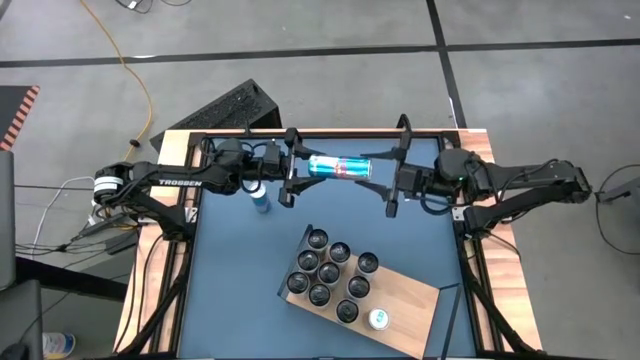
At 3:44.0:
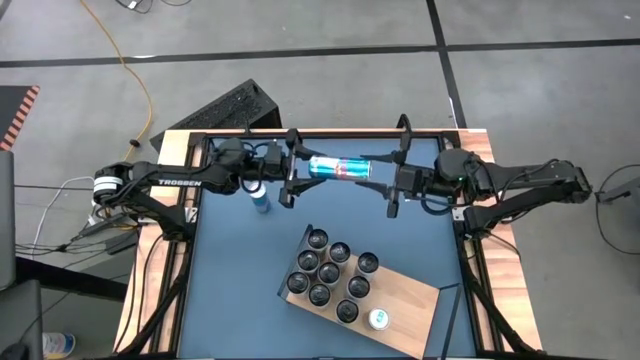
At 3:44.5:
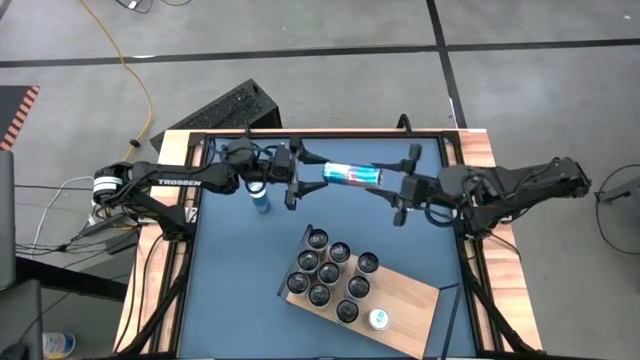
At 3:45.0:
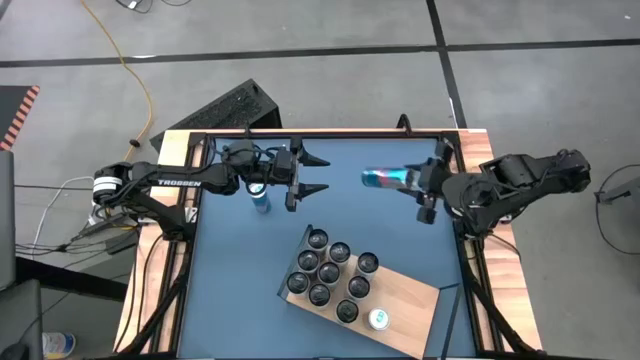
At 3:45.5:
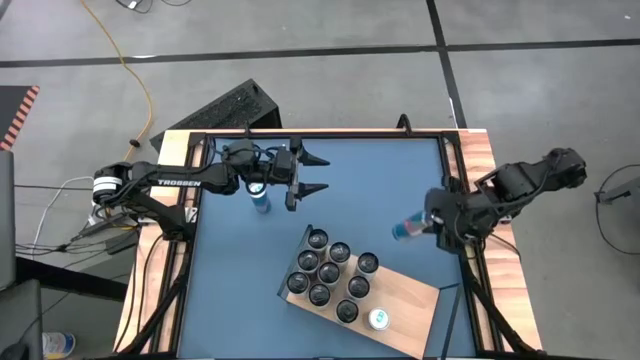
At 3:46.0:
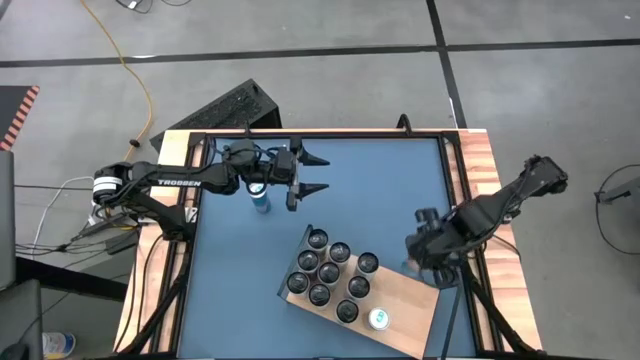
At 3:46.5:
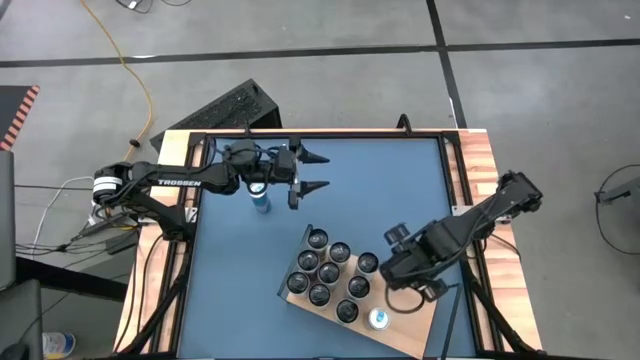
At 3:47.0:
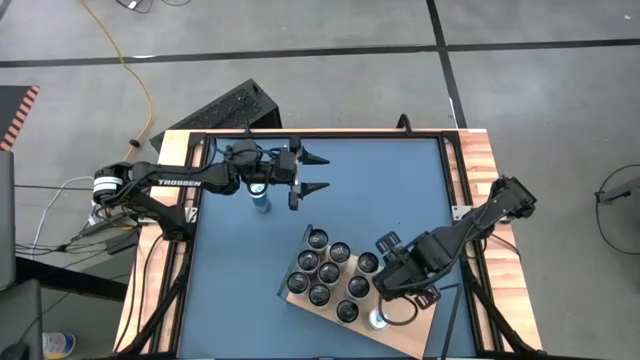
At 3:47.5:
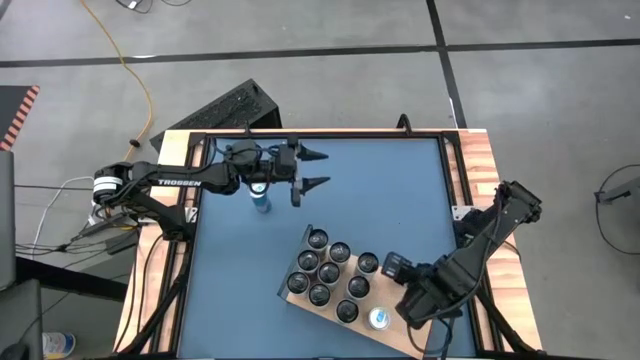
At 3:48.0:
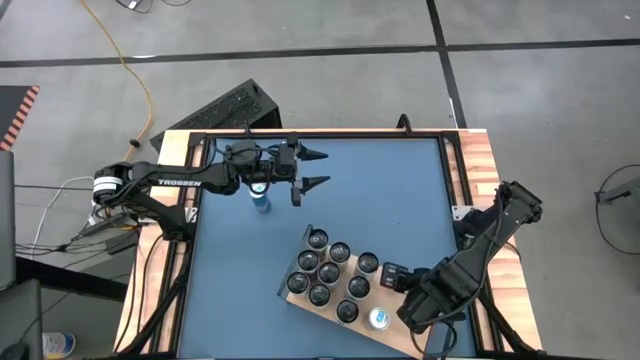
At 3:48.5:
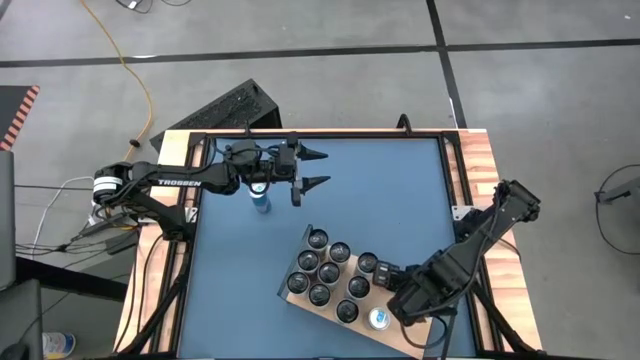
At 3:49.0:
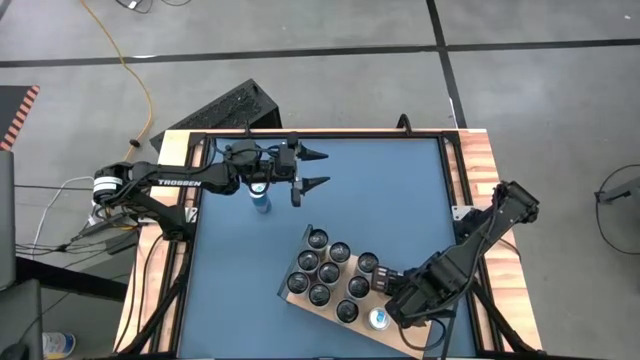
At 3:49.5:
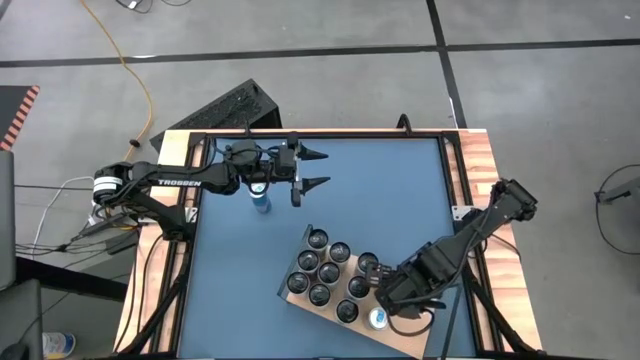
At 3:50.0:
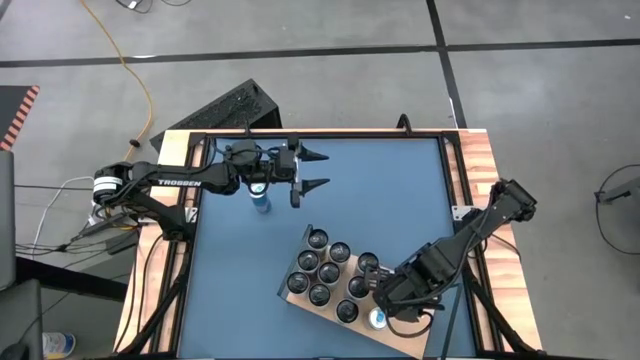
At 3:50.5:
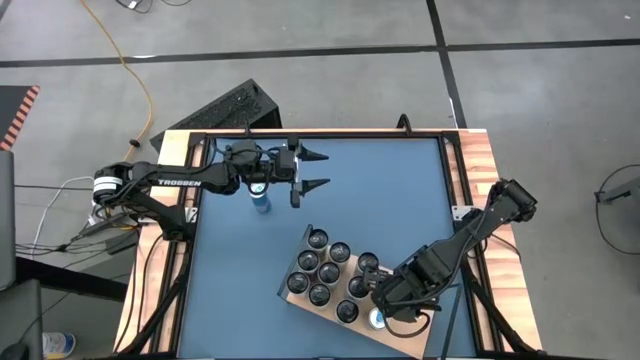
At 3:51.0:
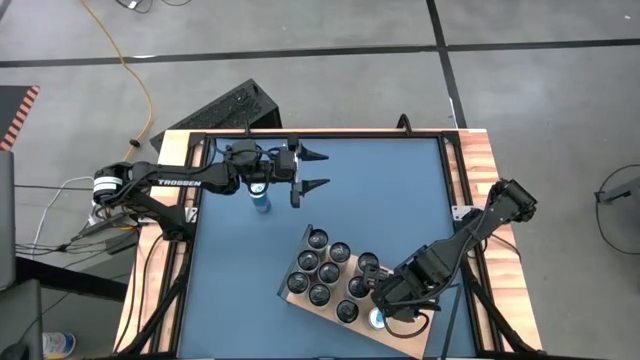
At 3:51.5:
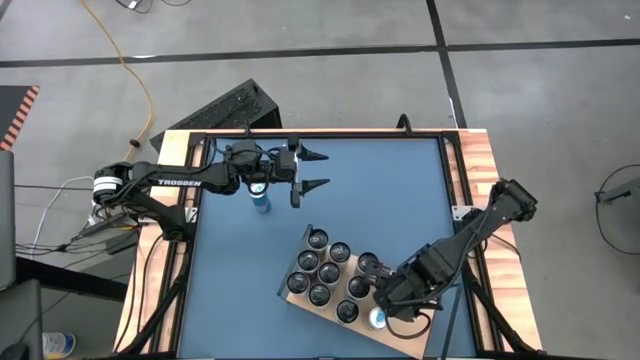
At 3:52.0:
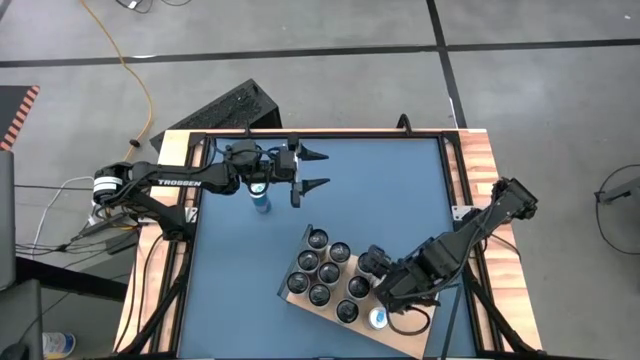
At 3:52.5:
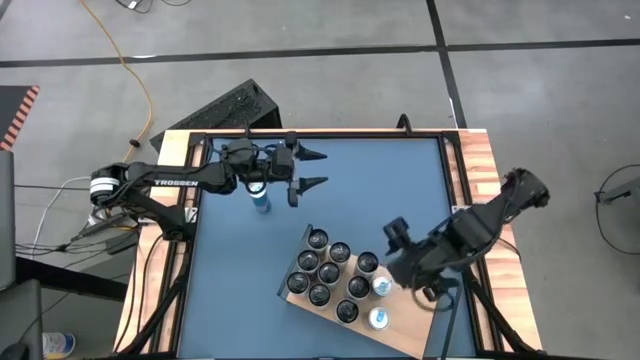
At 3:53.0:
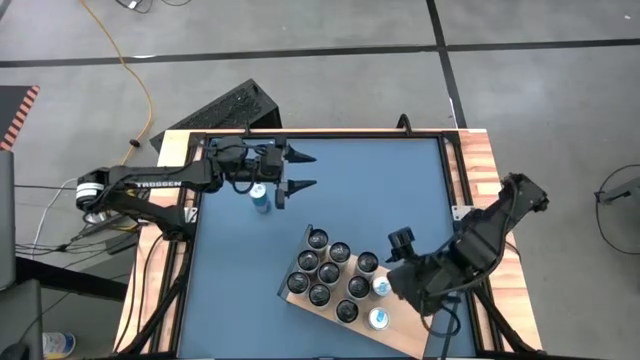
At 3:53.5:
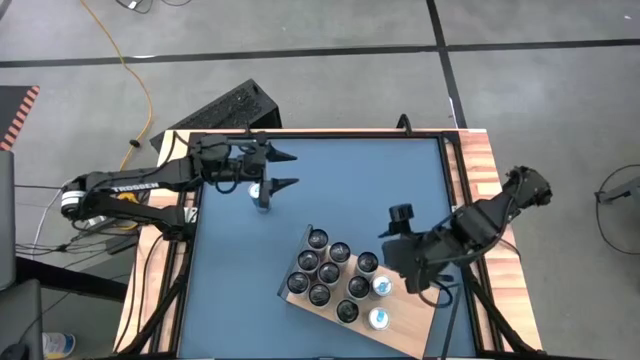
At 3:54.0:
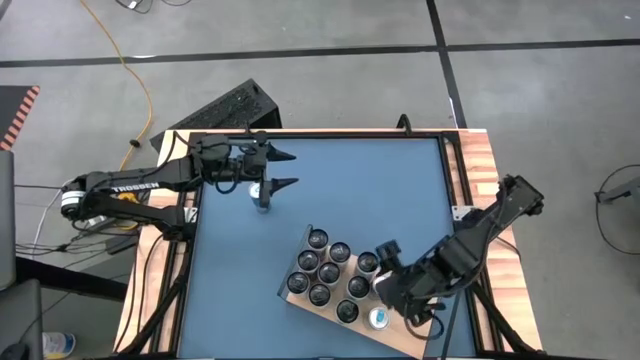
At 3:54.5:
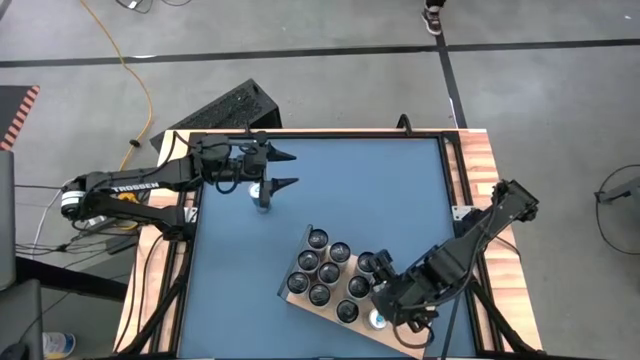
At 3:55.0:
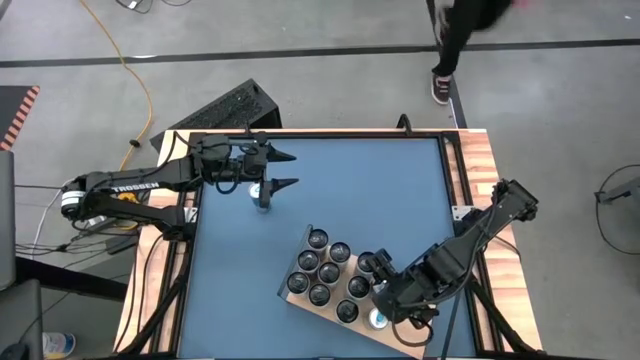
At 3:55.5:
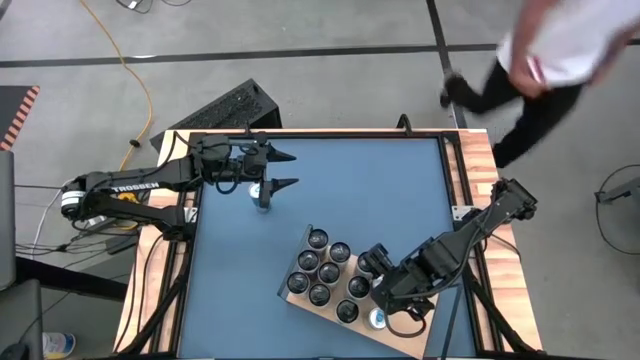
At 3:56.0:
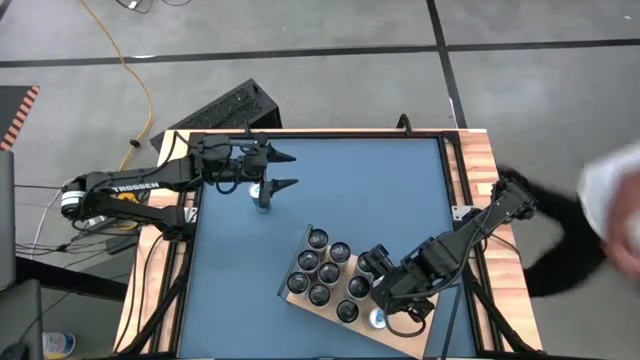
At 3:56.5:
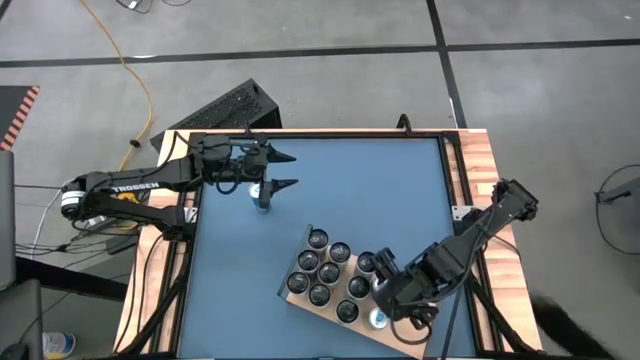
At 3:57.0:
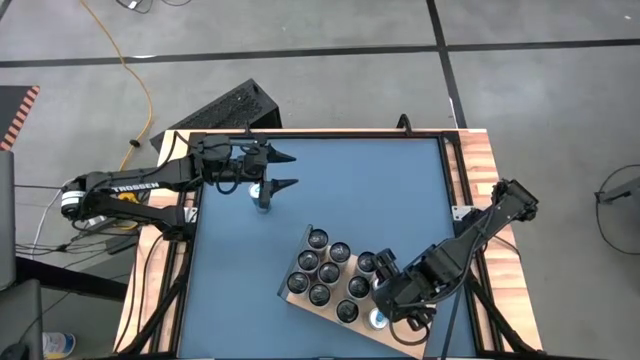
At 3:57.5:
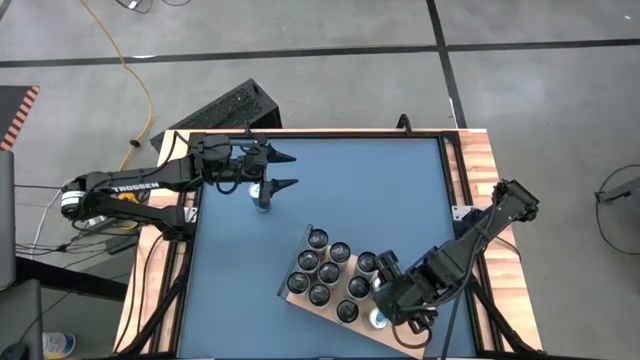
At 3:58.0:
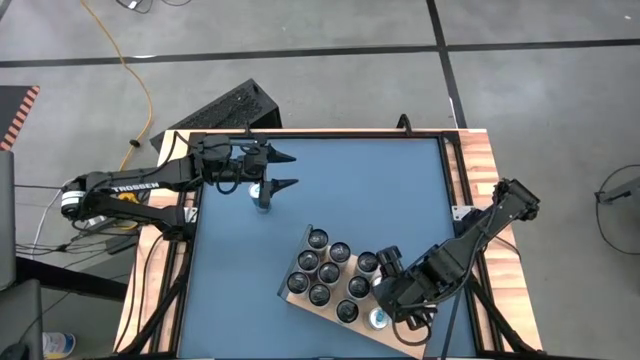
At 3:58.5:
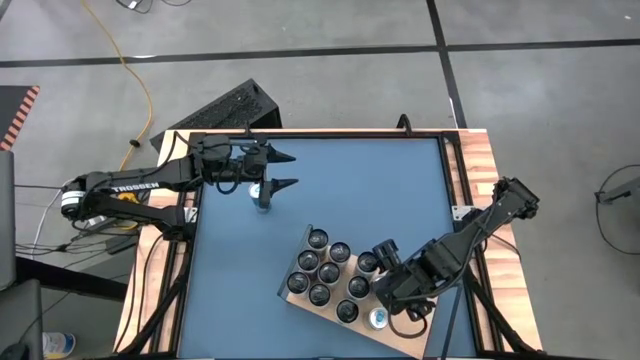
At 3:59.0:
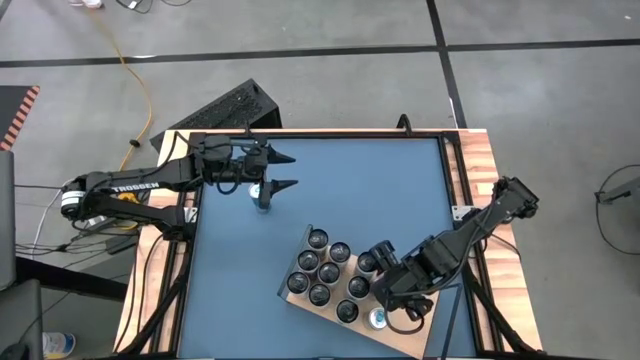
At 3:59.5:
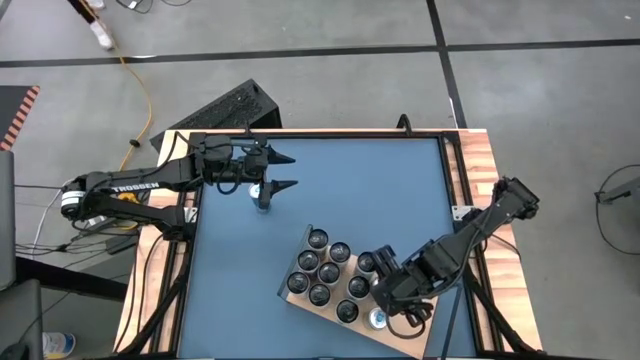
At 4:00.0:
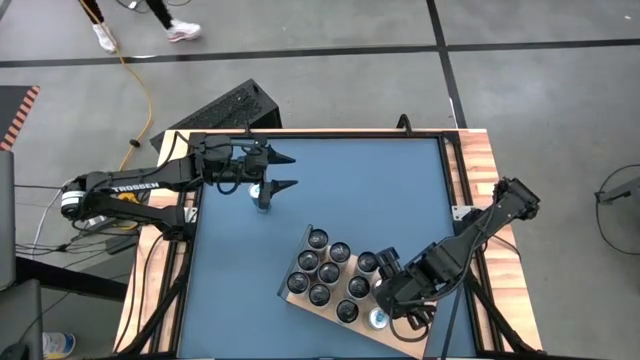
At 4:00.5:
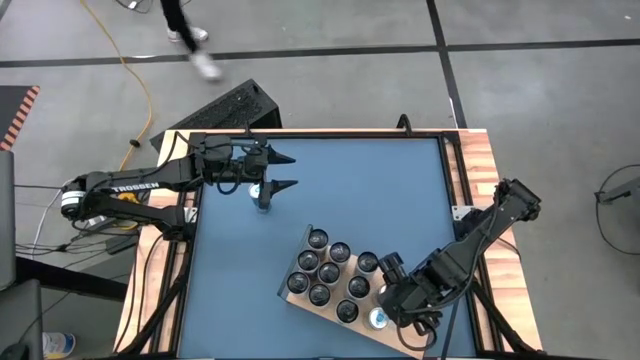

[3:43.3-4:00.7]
Task: Place canned beverage on shelf
Put the right blue soda can aligned with the other blue soda can on the shelf

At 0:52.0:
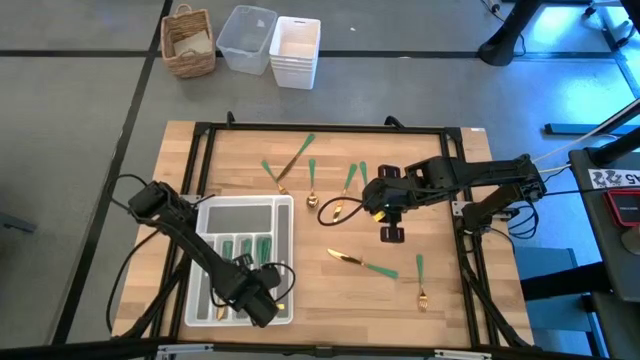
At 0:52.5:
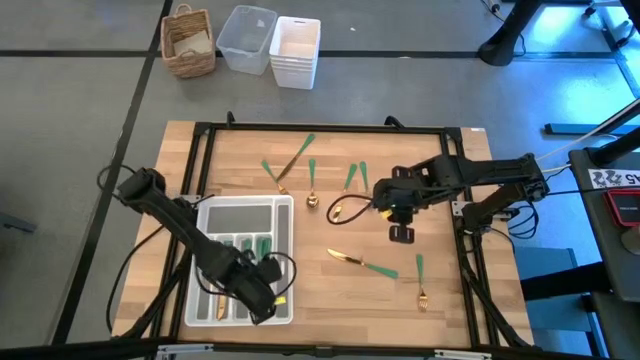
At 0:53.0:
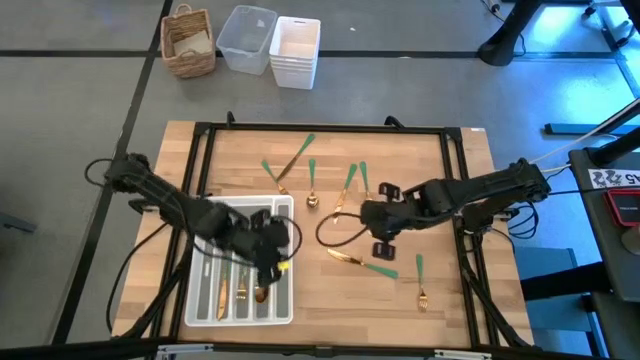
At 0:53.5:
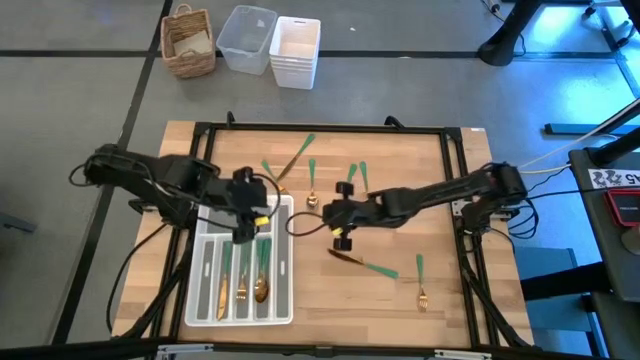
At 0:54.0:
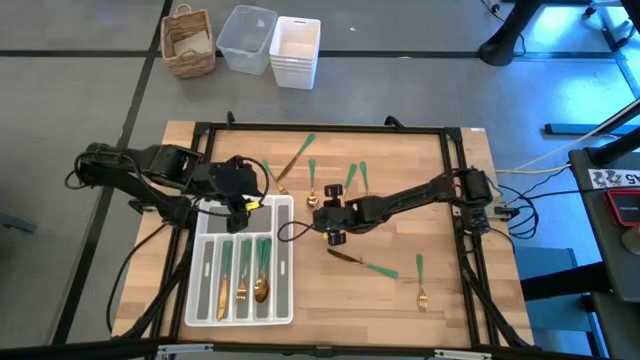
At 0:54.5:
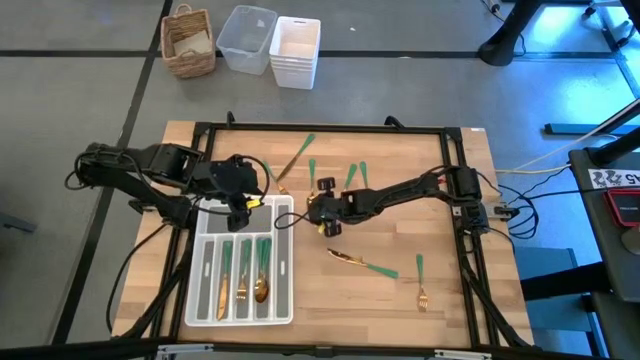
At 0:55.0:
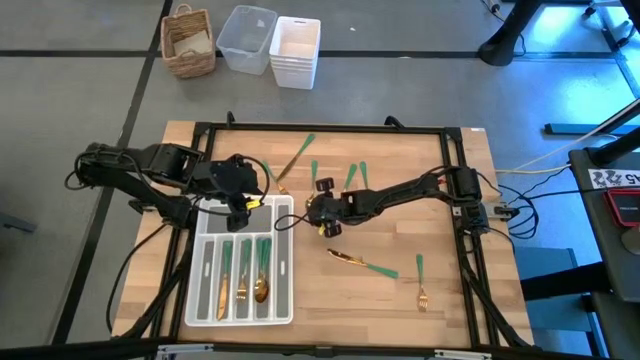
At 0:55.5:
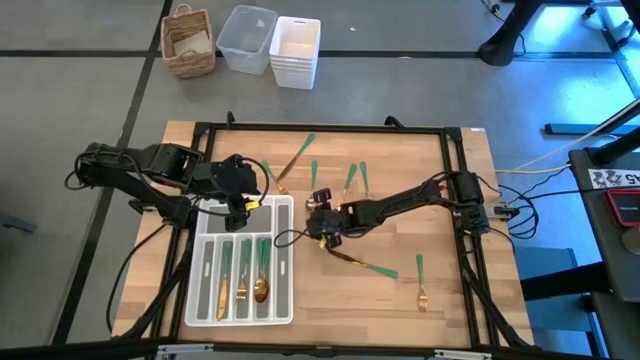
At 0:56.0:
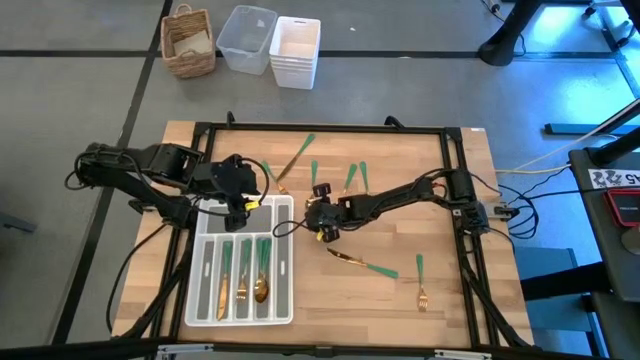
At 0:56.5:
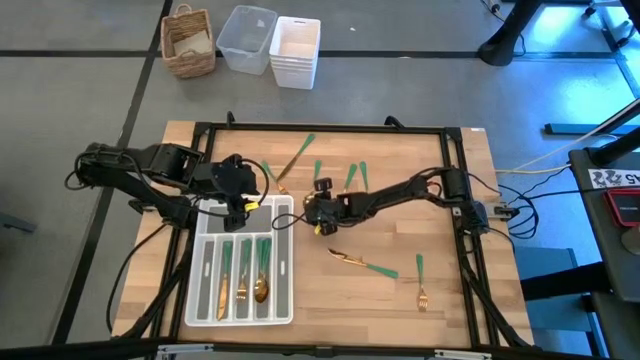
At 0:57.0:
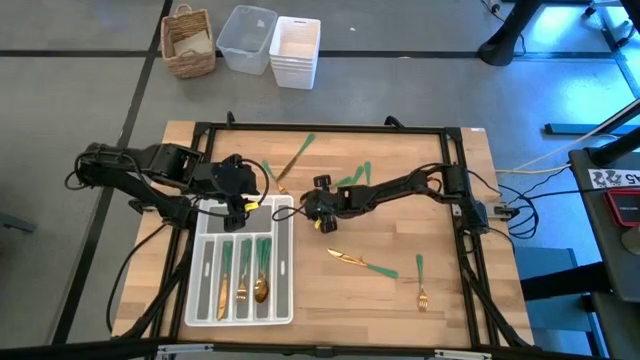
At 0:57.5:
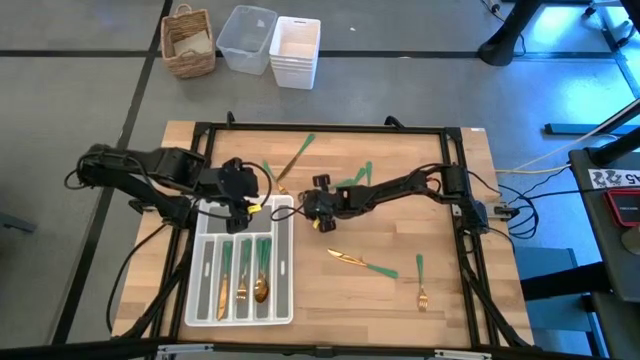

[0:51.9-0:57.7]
Task: Sort silverware
Put the green spoon on the silverware tray
